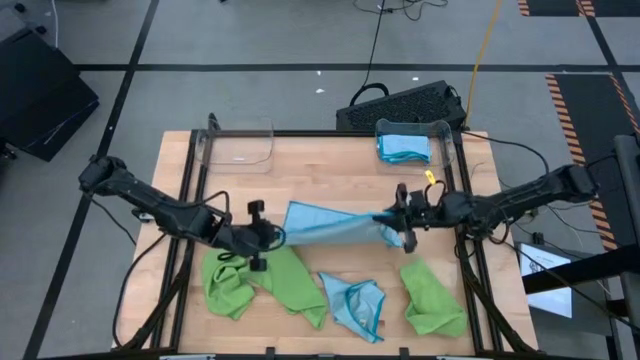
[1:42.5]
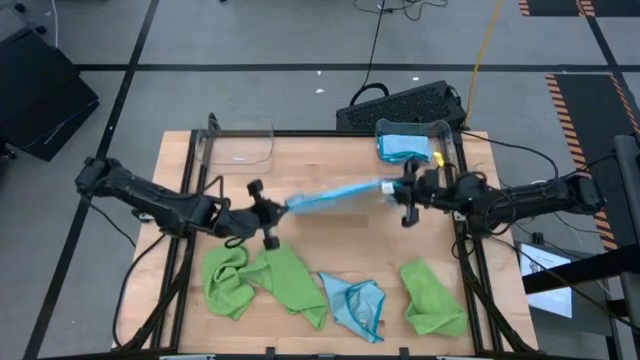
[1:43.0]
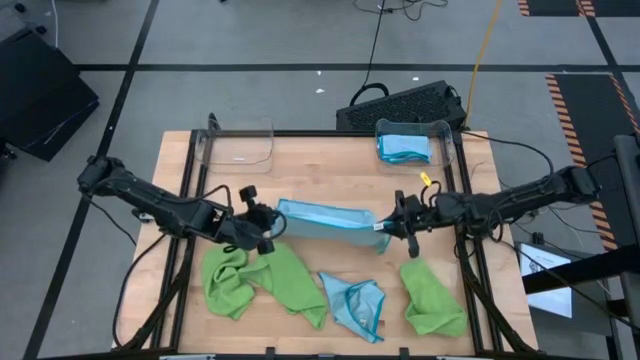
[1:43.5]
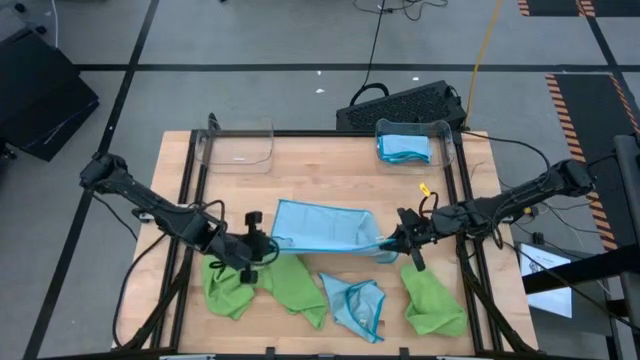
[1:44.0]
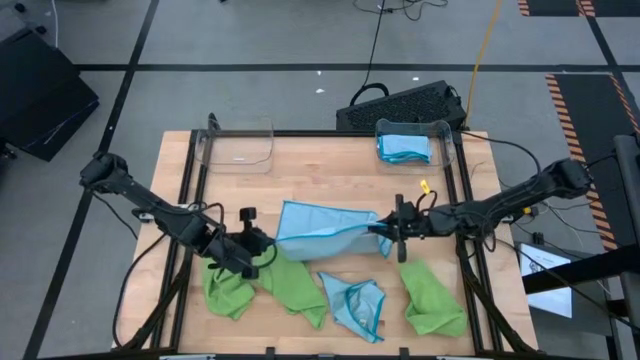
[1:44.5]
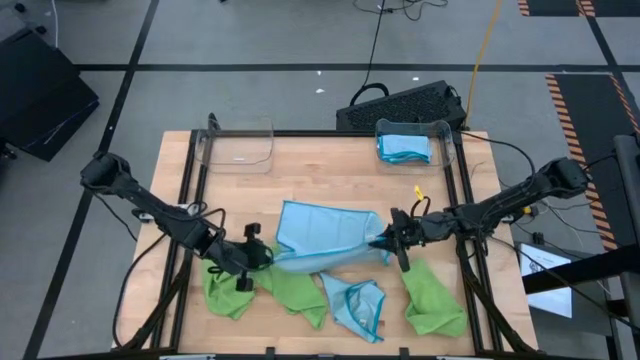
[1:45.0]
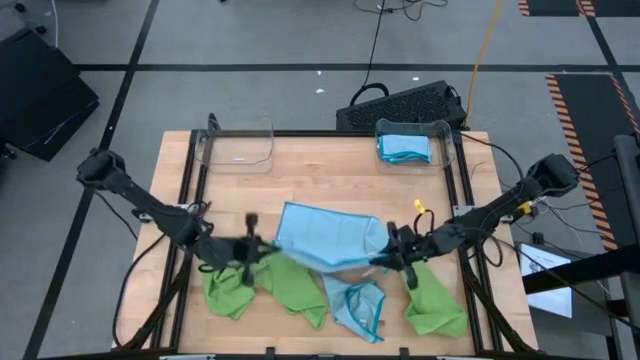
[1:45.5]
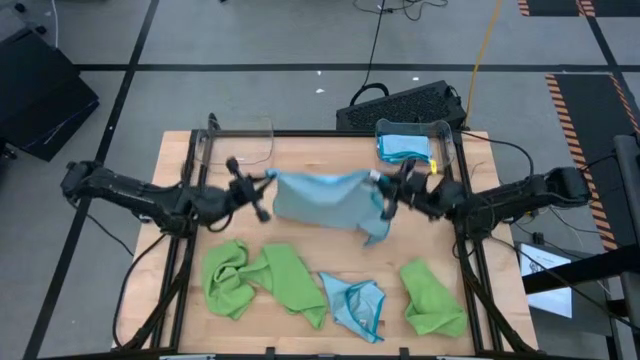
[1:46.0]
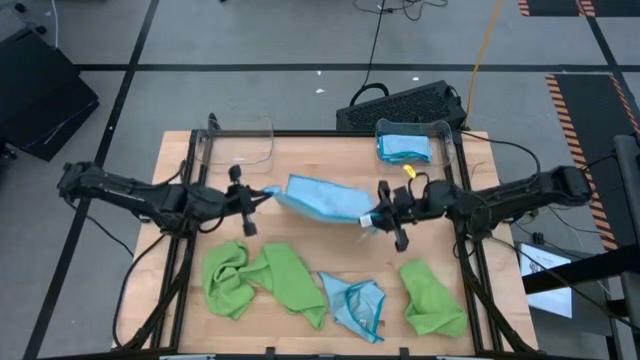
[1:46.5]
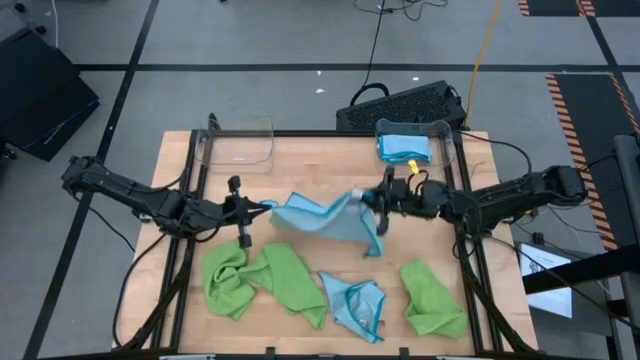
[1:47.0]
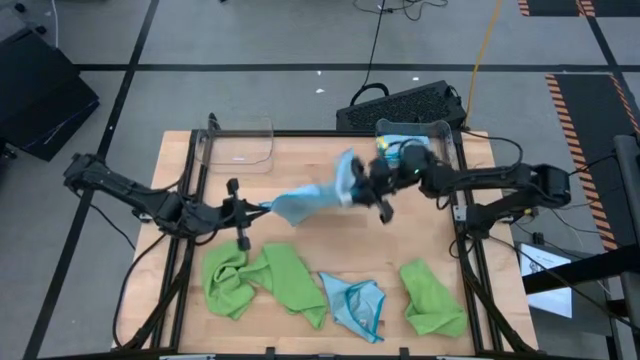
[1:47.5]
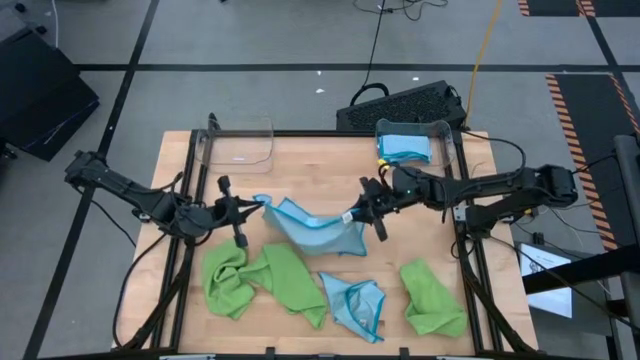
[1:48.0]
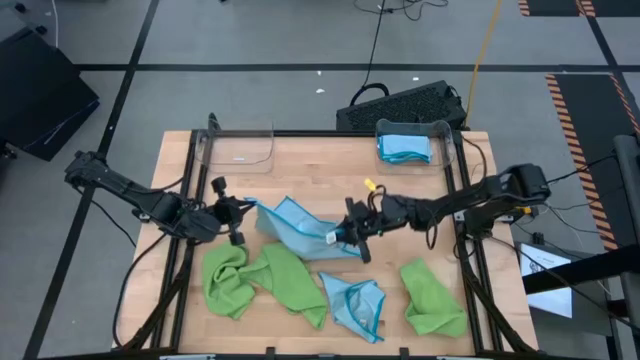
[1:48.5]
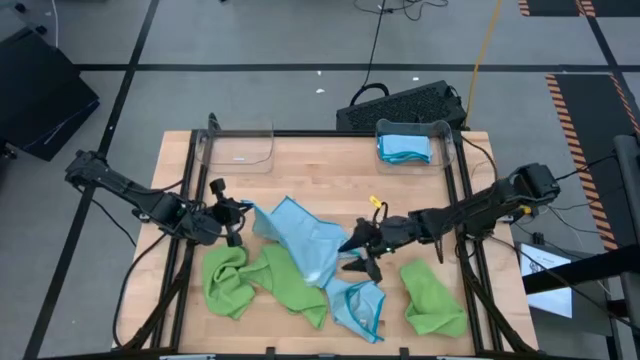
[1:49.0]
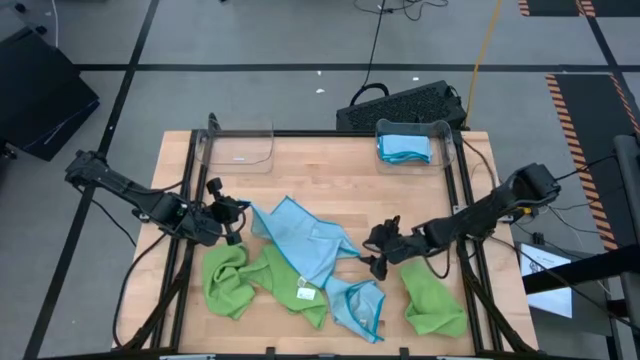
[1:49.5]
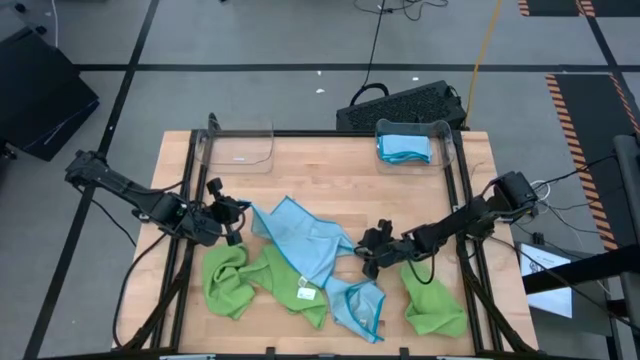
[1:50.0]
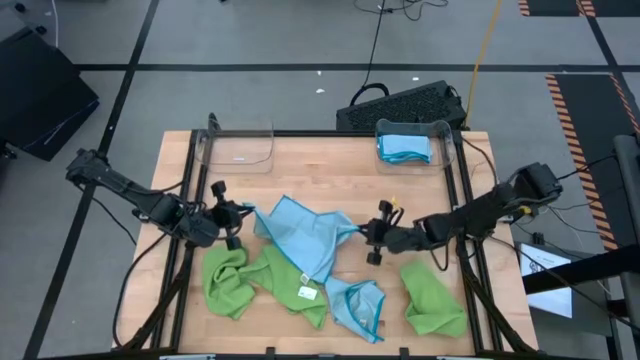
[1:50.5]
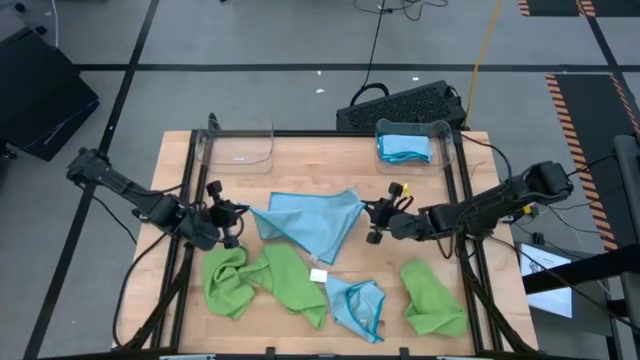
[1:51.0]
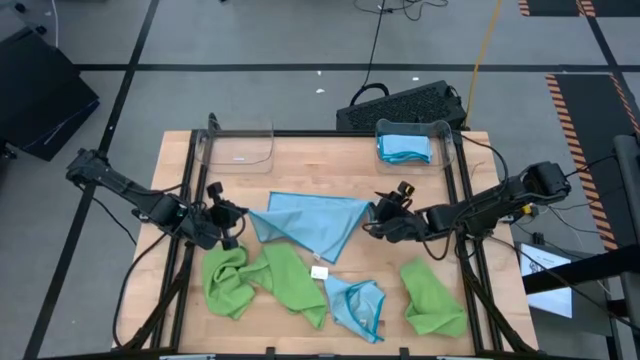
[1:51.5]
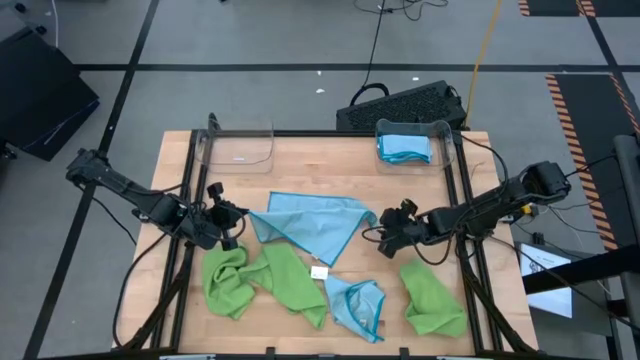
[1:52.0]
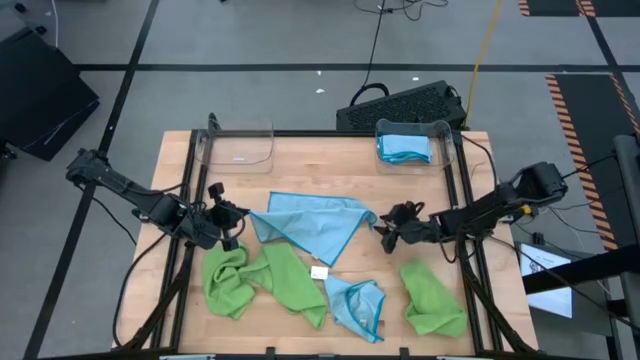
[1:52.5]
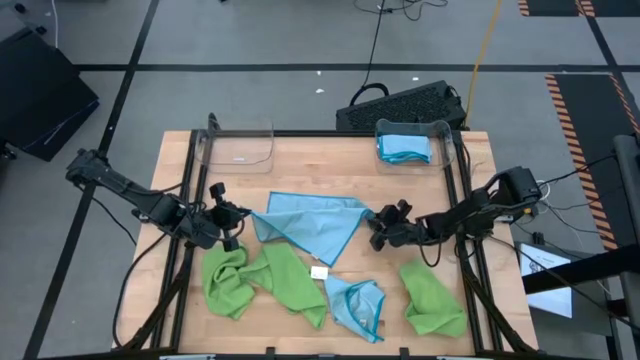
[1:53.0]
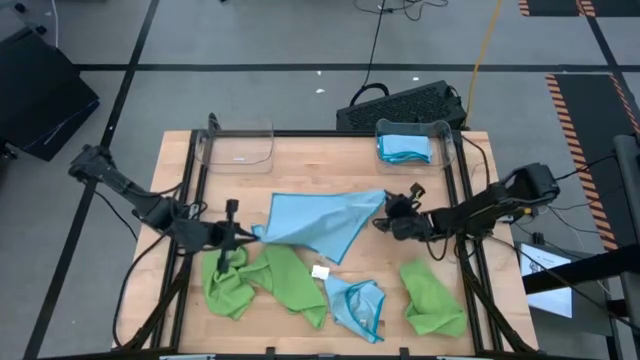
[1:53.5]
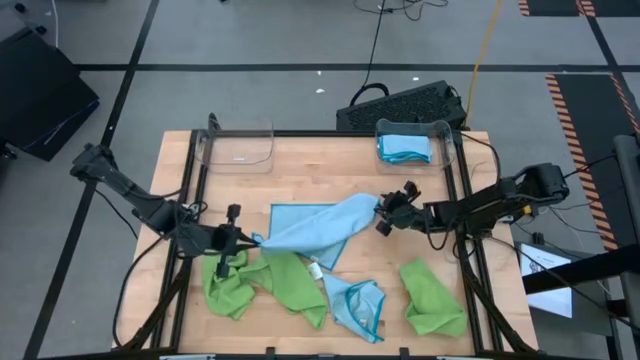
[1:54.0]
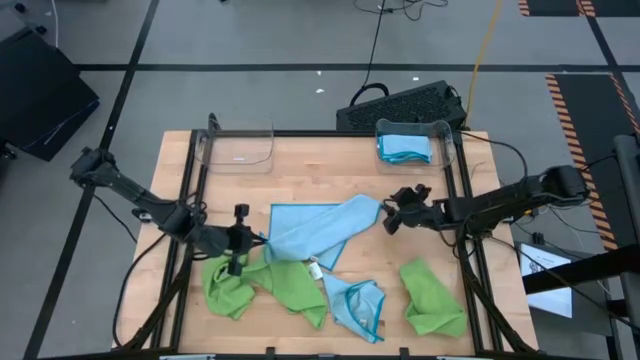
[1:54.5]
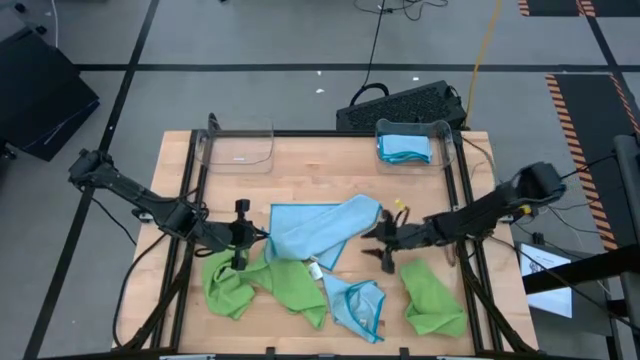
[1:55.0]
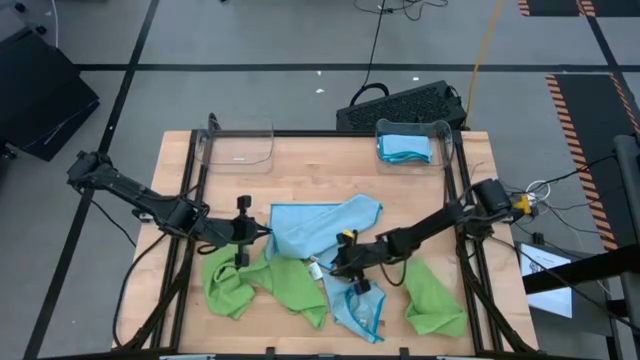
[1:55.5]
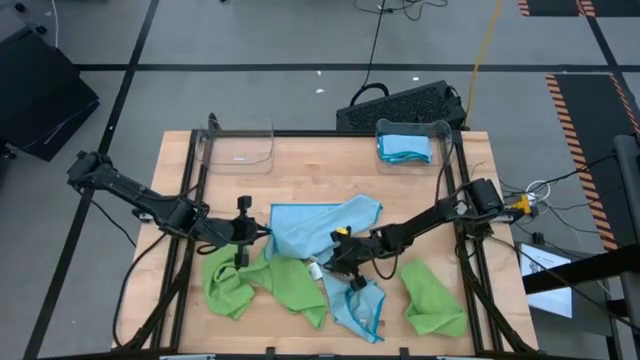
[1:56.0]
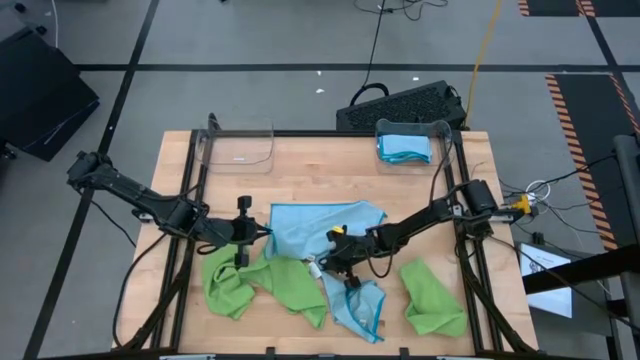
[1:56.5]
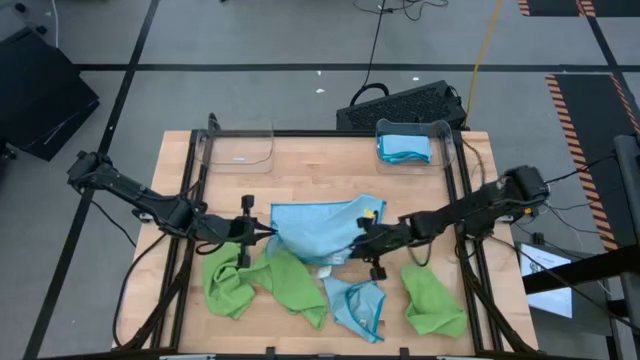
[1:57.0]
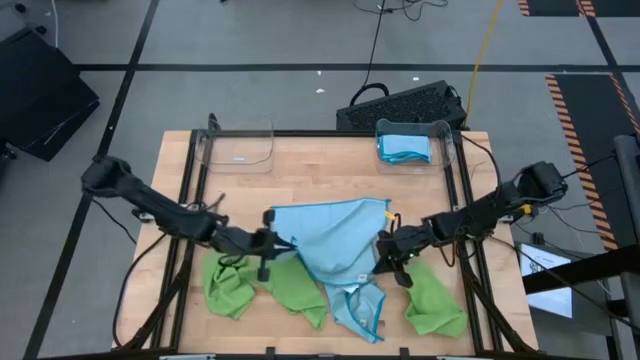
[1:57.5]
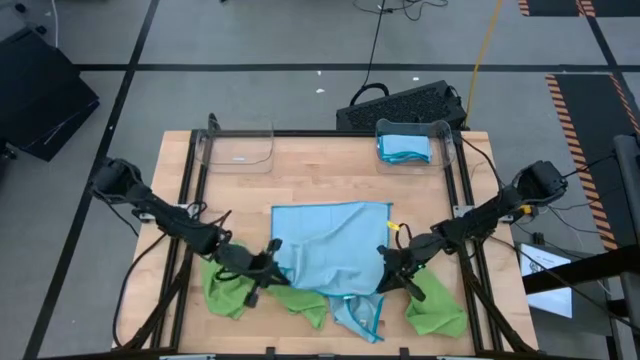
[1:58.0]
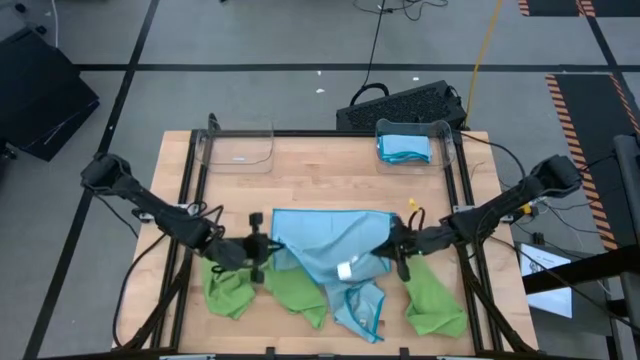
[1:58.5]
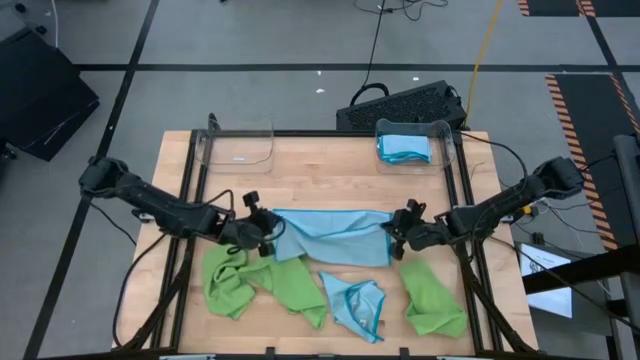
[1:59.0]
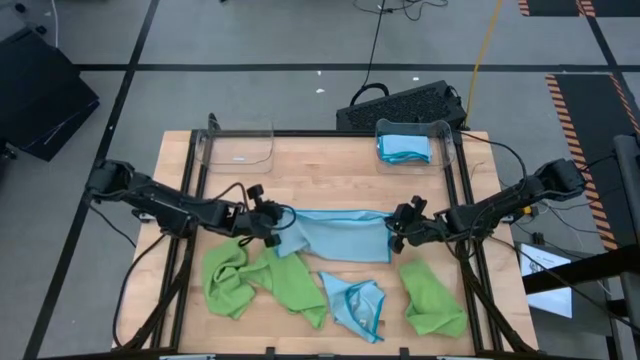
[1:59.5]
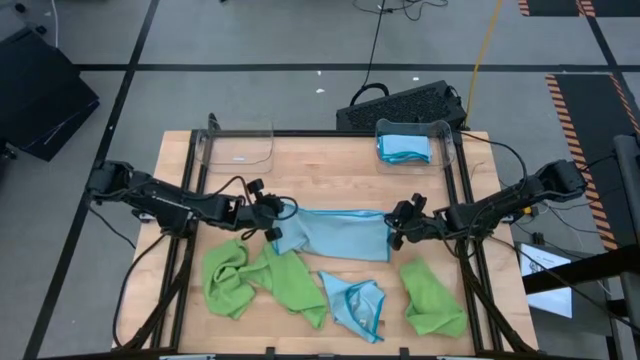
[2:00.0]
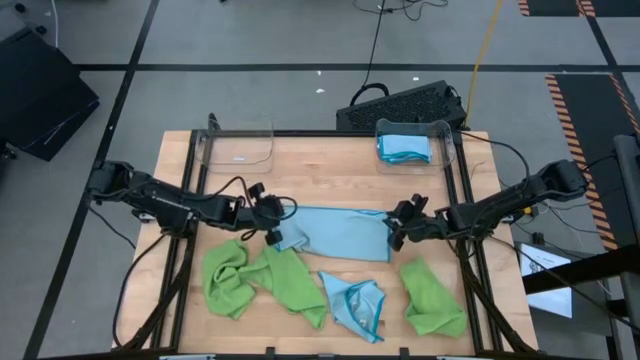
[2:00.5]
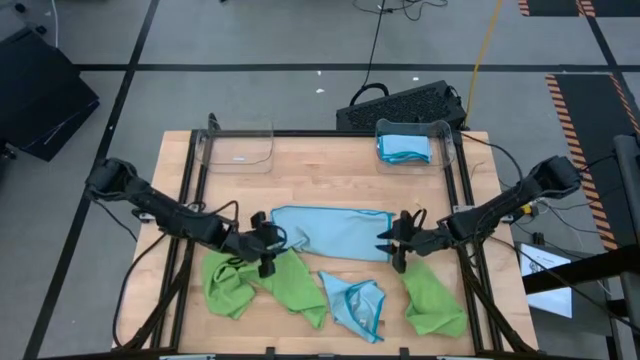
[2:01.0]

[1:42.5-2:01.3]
Task: Fold microfiber towels
Fold the top blue microfiber cloth

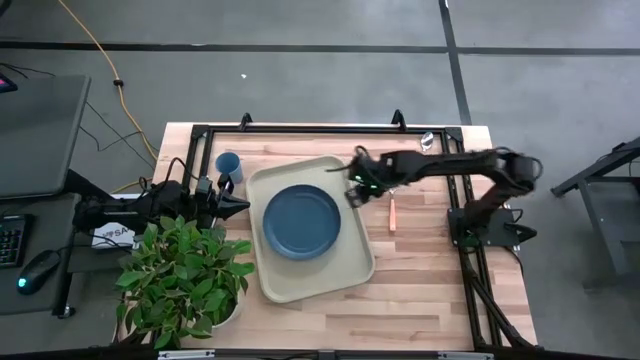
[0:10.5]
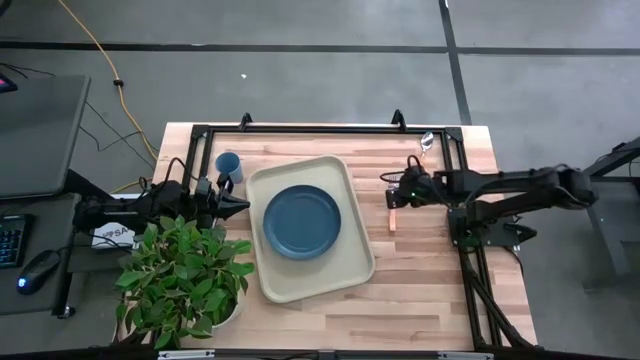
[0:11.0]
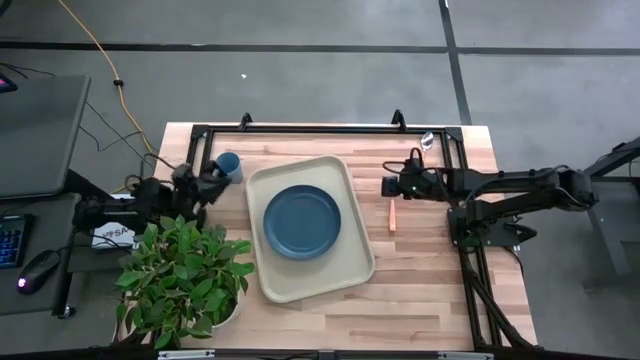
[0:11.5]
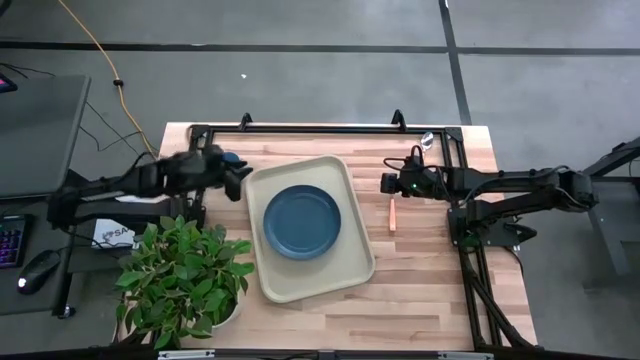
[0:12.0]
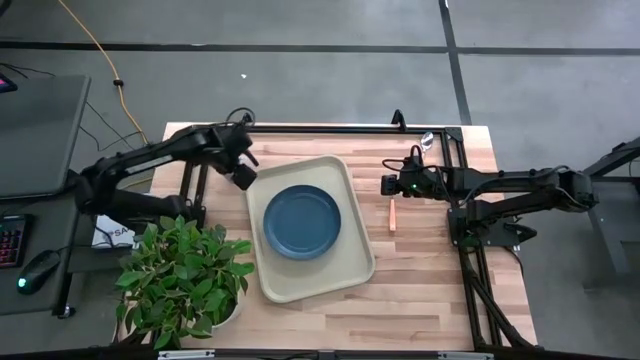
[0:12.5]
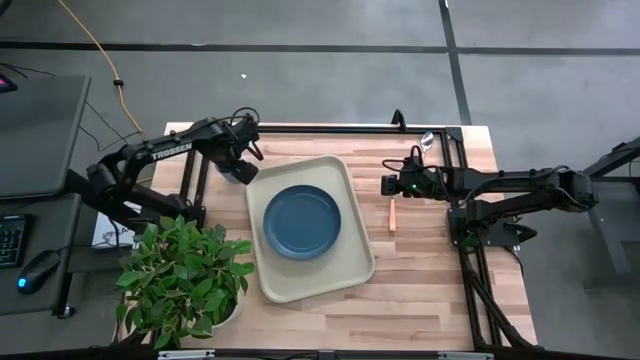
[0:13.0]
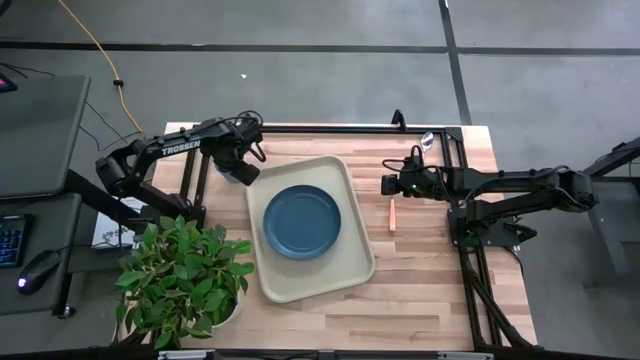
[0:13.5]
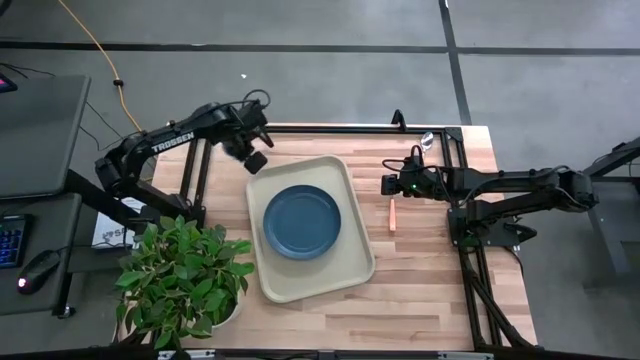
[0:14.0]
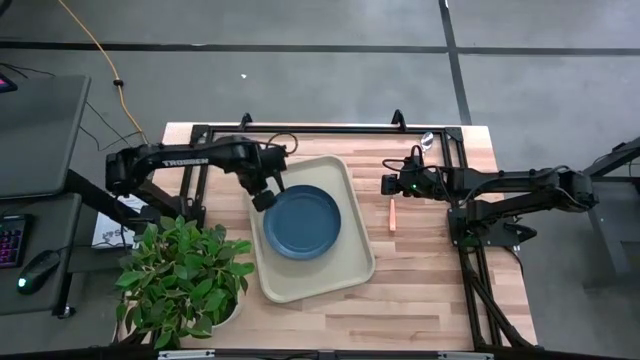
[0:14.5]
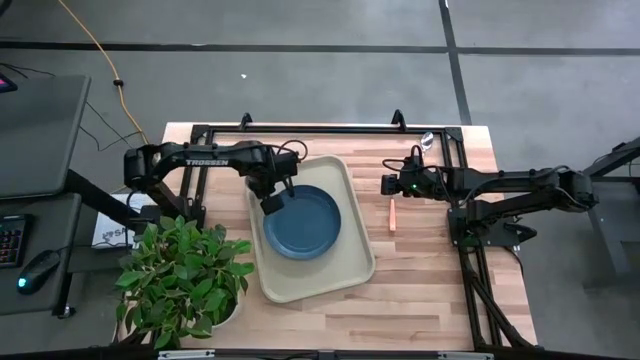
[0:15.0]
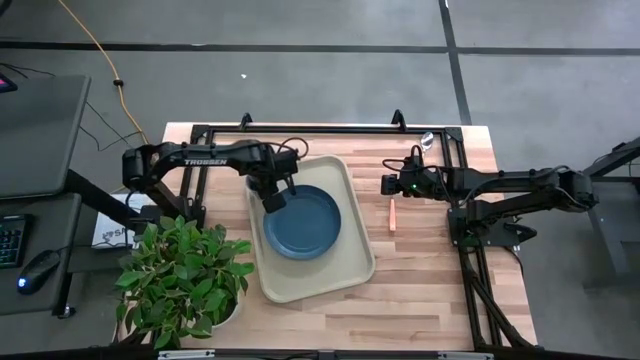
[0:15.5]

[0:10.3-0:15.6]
Task: Pick and place plate/cup/fork/spoon on tray
Put the blue cup on the white serving tray to the top right of the blue plate
